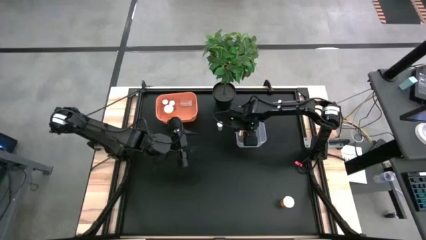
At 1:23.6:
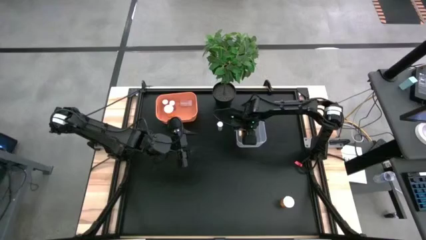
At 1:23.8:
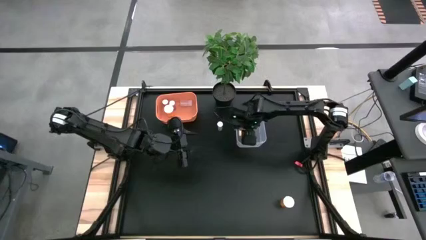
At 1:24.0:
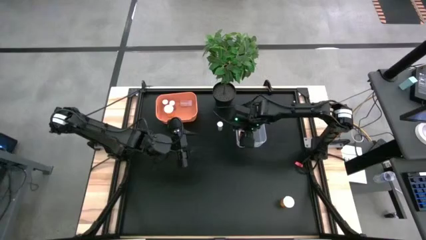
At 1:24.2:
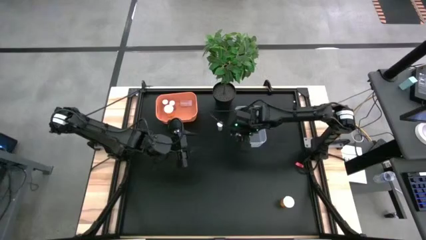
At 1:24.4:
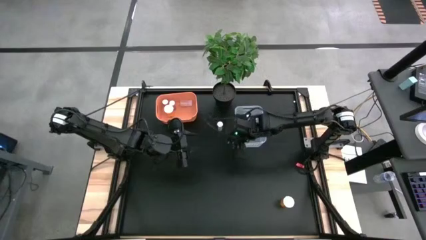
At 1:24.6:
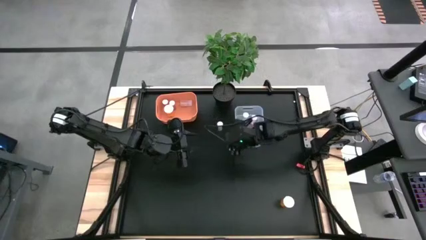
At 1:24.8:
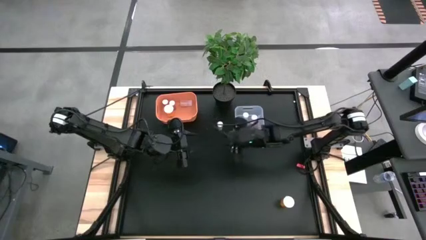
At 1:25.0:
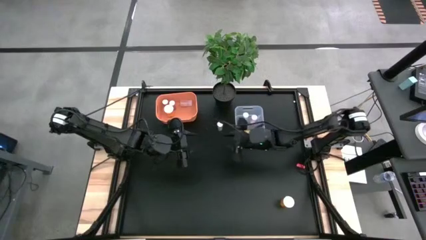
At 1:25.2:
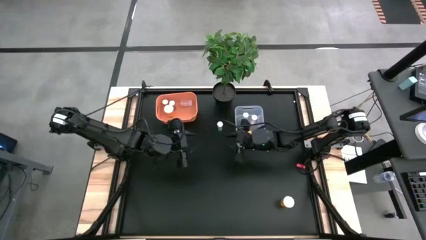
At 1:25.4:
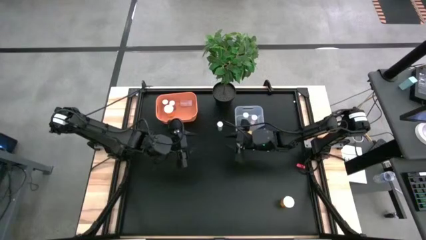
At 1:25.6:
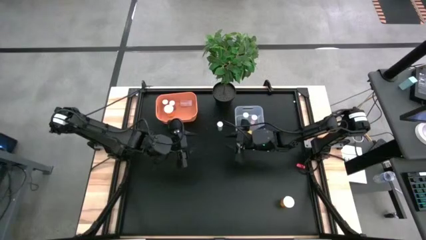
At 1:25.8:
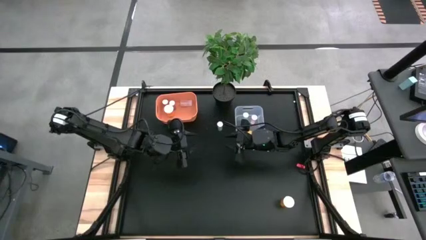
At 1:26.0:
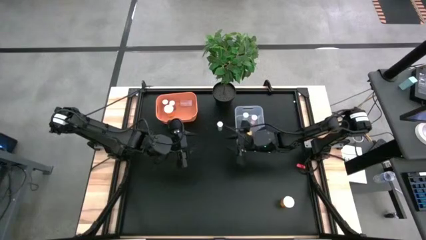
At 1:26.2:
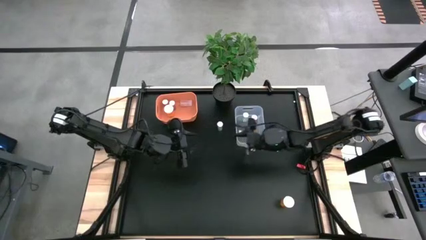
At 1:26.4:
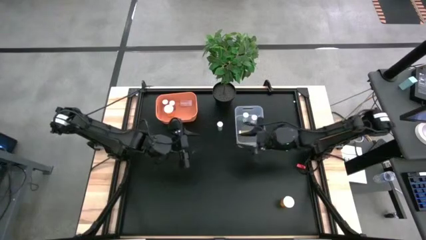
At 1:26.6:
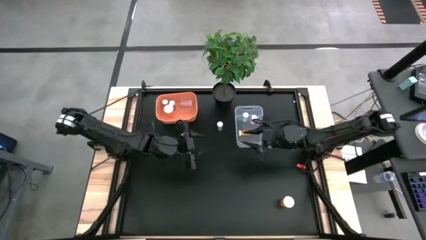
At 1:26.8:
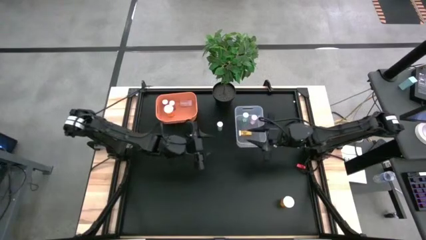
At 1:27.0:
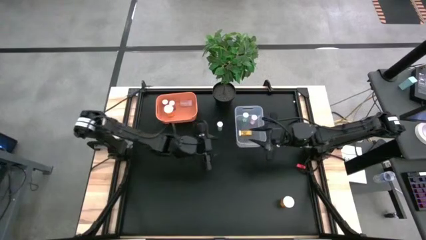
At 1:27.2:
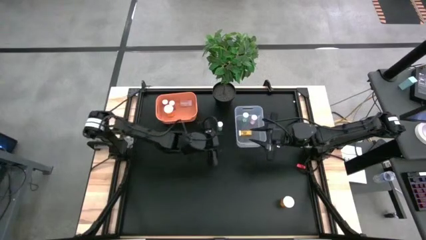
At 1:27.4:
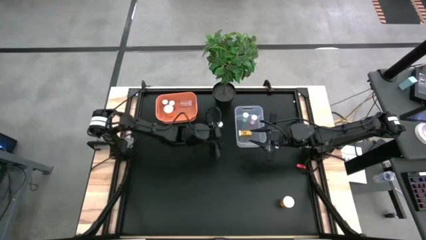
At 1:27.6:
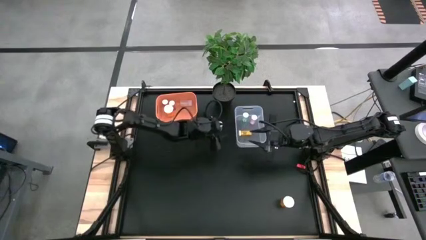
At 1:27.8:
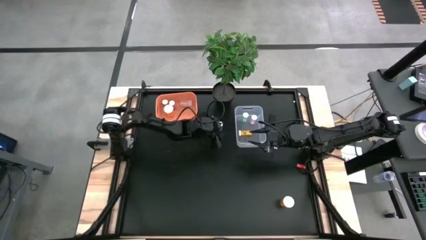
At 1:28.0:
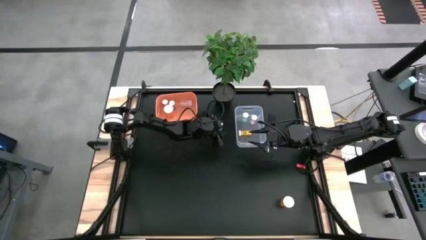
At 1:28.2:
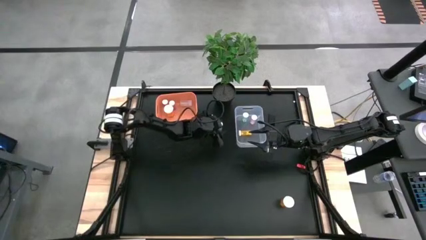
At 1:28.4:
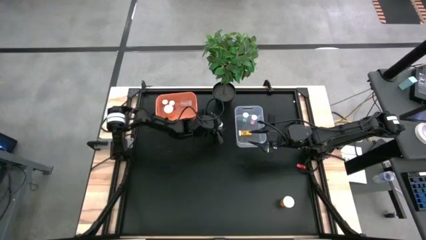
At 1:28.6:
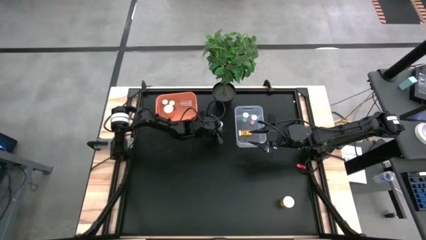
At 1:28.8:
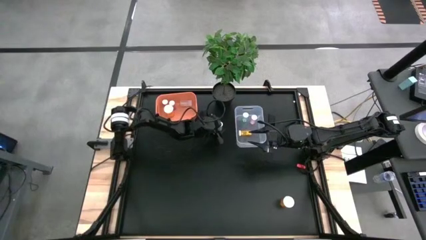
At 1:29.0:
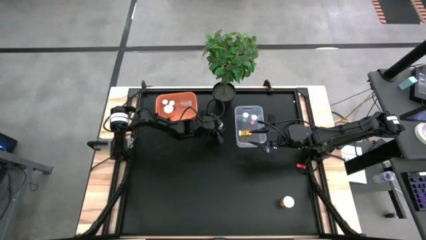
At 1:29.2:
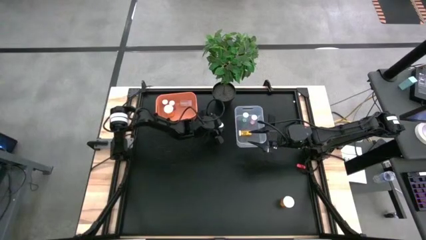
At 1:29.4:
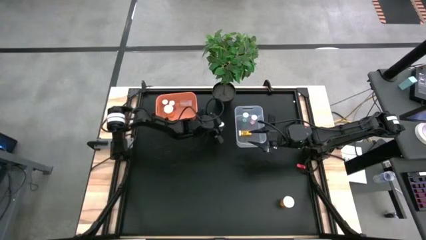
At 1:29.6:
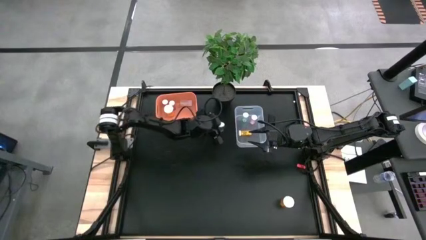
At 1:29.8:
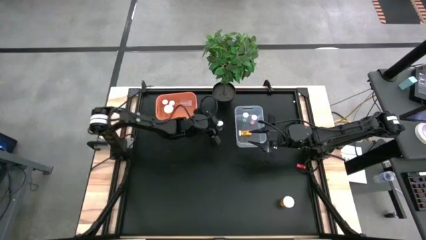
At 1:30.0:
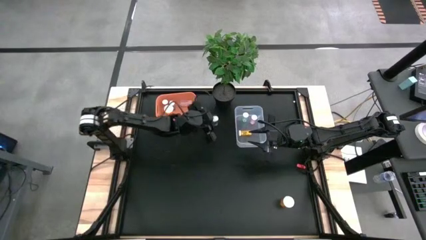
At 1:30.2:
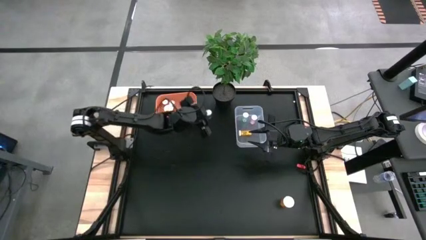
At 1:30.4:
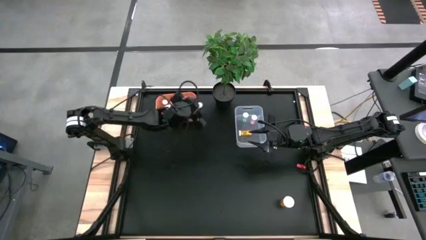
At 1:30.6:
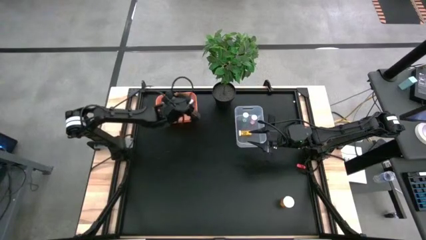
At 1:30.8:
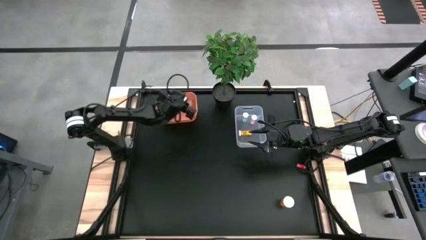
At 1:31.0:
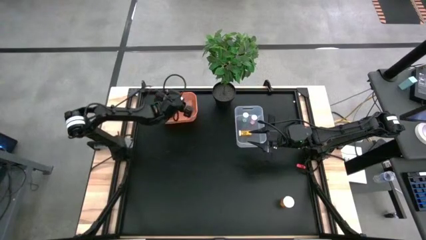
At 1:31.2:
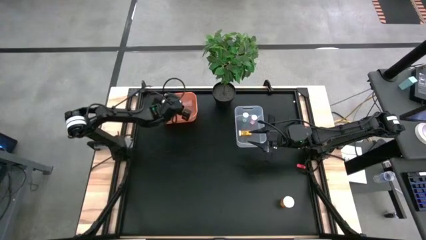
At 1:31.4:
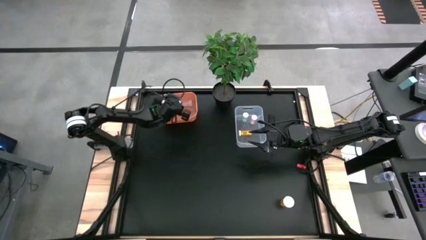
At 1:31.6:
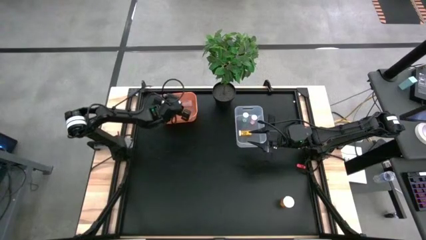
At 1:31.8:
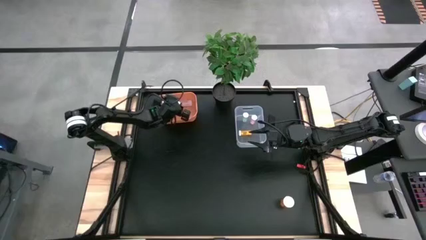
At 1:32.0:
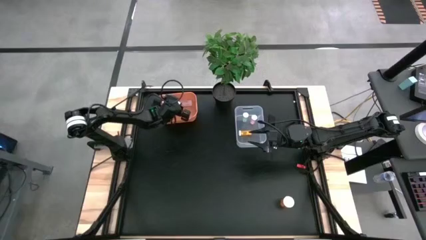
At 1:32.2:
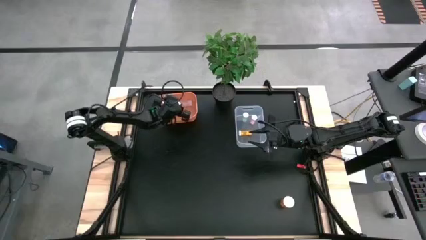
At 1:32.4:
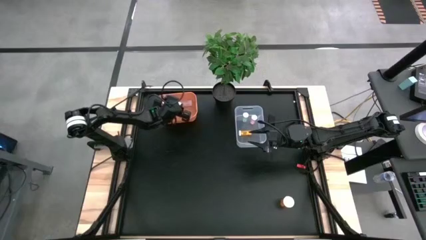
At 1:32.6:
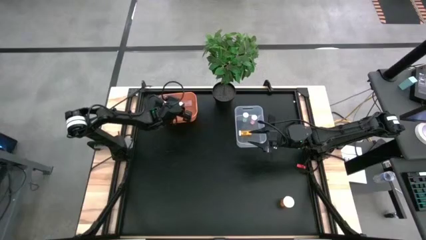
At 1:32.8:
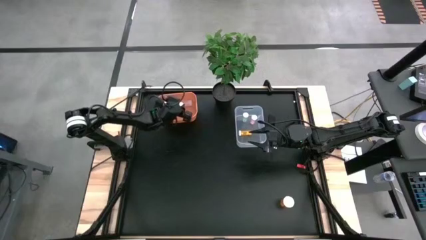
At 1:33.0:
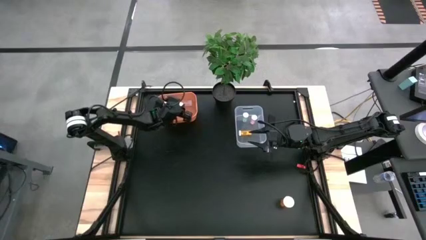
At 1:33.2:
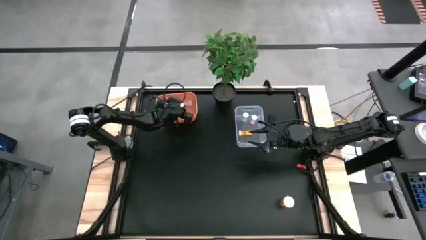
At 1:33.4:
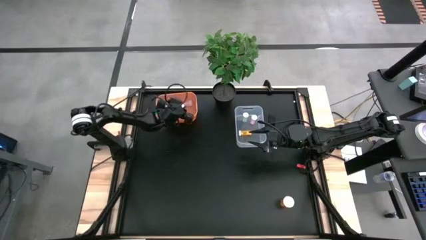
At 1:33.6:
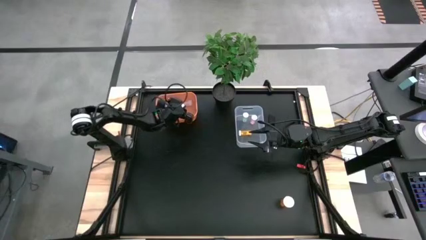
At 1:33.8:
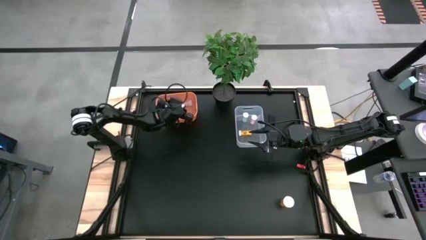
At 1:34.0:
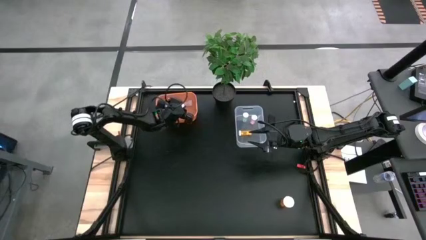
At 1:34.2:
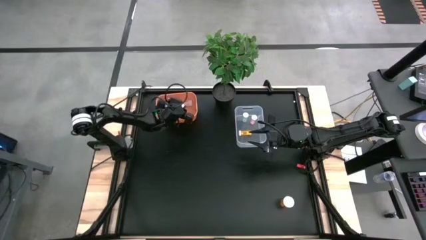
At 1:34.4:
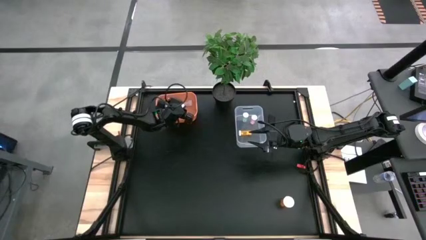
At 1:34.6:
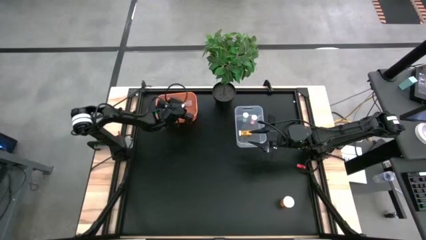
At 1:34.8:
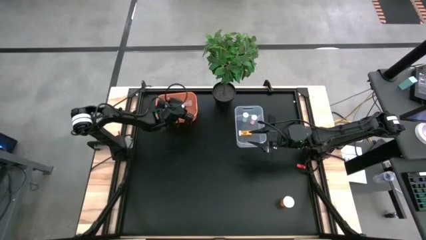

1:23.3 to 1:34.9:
Task: Pick and place medicine bottles into bin by pill shape (circle, oval)
Put the blue tablet pill bottle into the orange bin
